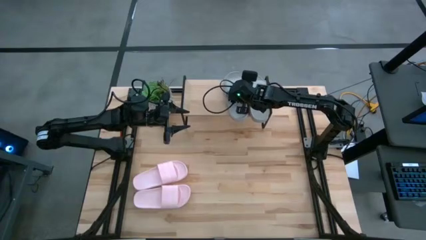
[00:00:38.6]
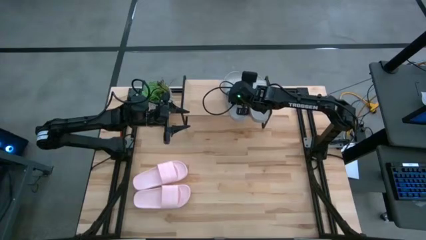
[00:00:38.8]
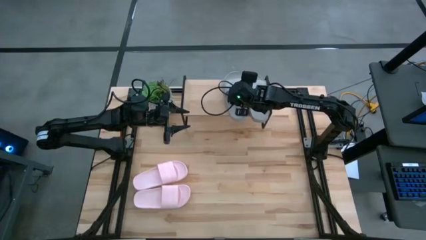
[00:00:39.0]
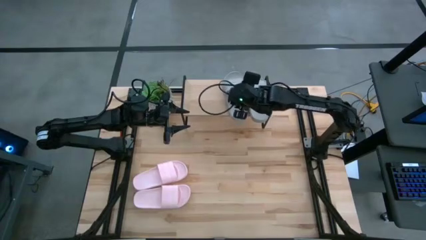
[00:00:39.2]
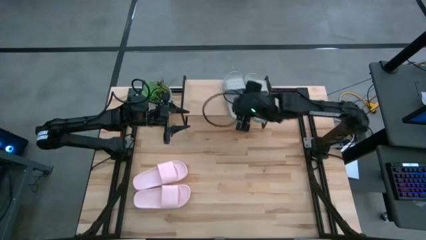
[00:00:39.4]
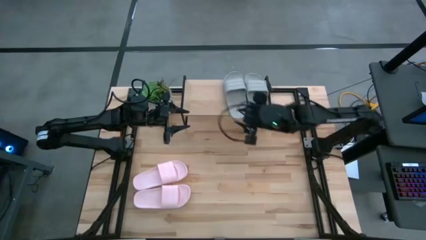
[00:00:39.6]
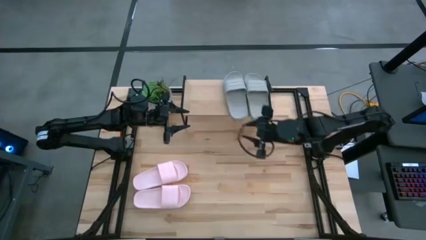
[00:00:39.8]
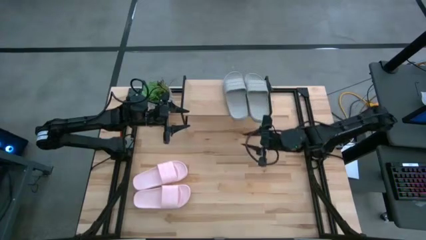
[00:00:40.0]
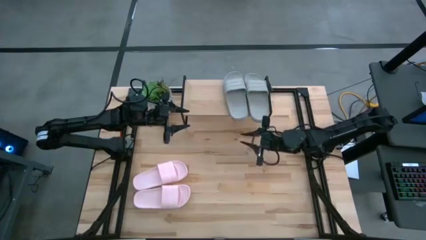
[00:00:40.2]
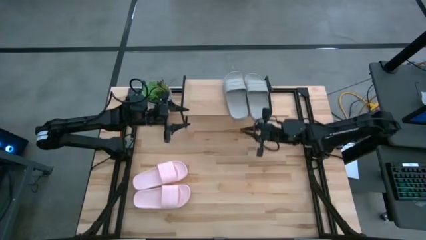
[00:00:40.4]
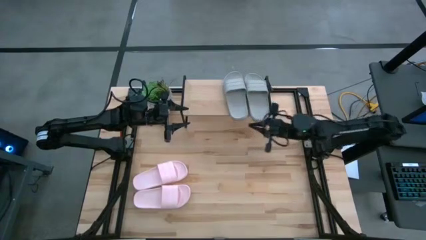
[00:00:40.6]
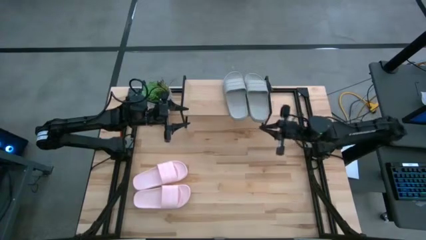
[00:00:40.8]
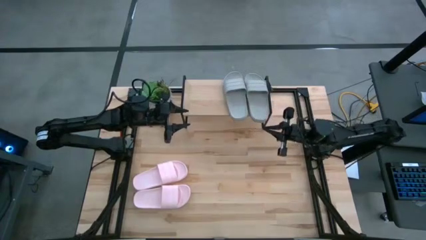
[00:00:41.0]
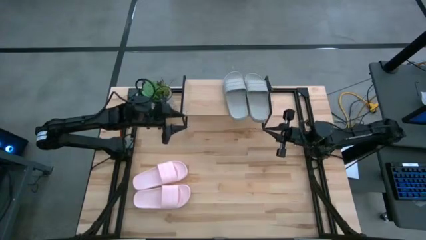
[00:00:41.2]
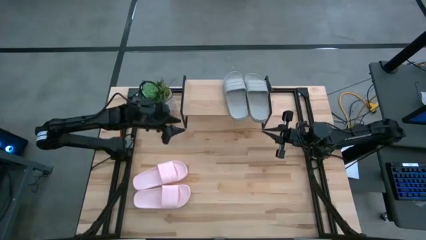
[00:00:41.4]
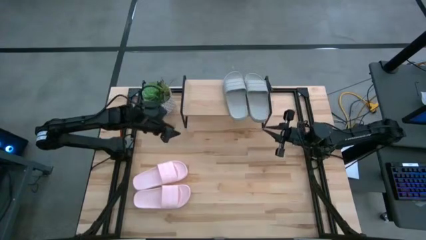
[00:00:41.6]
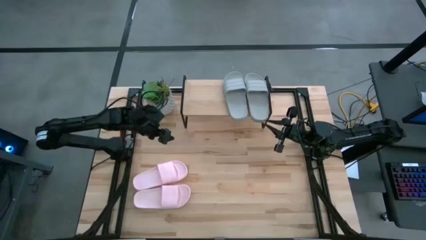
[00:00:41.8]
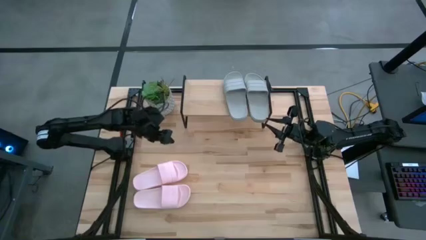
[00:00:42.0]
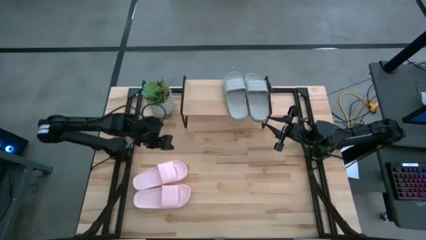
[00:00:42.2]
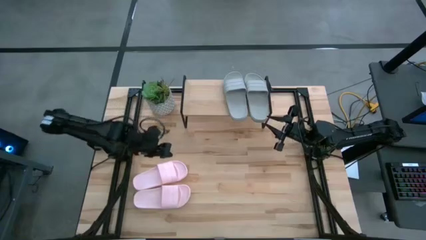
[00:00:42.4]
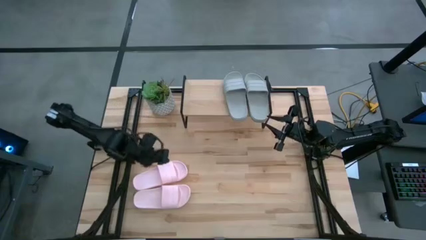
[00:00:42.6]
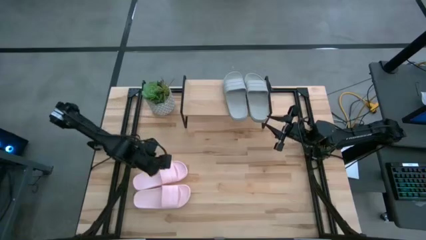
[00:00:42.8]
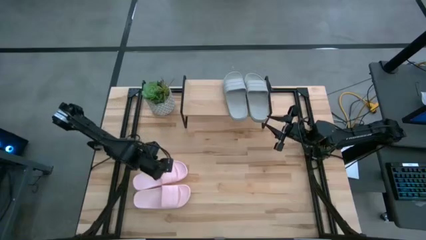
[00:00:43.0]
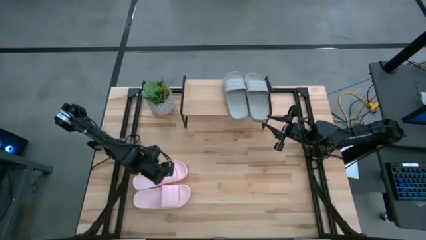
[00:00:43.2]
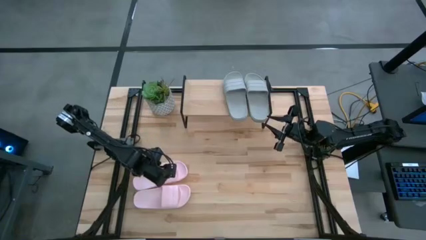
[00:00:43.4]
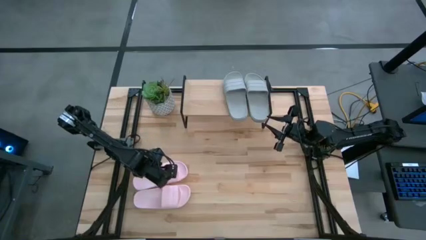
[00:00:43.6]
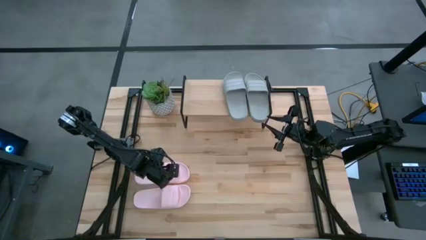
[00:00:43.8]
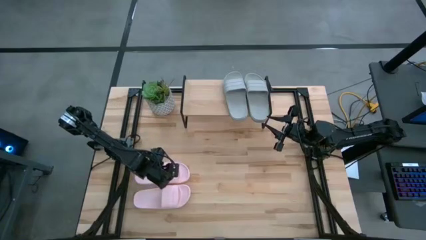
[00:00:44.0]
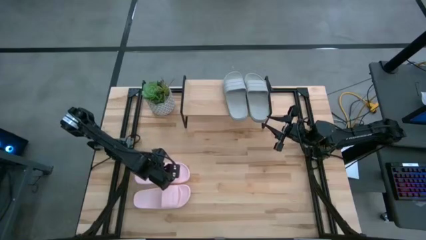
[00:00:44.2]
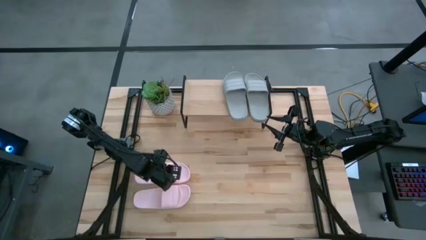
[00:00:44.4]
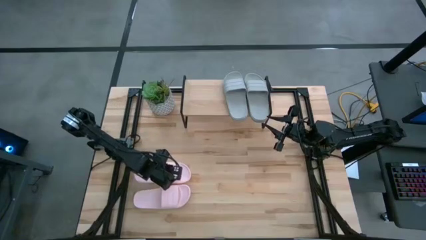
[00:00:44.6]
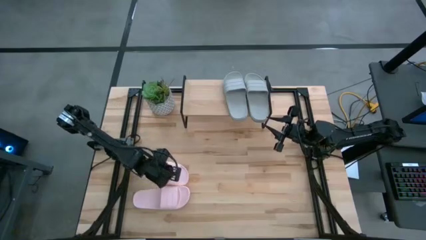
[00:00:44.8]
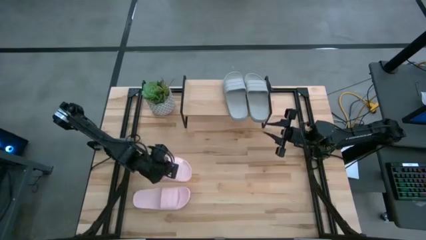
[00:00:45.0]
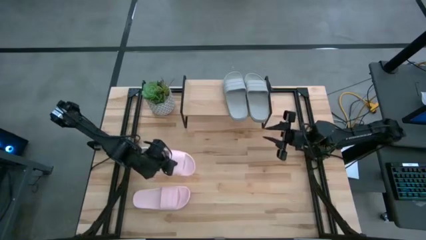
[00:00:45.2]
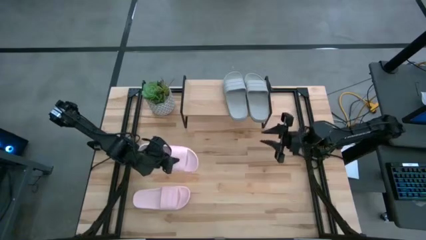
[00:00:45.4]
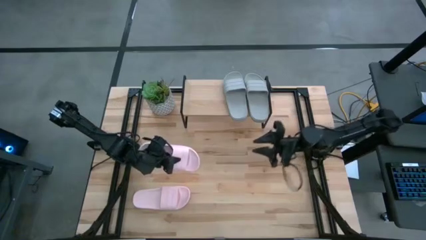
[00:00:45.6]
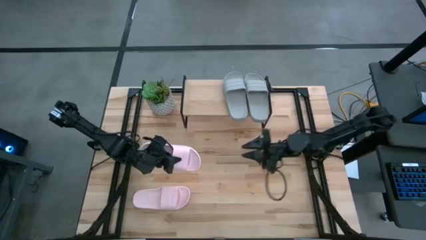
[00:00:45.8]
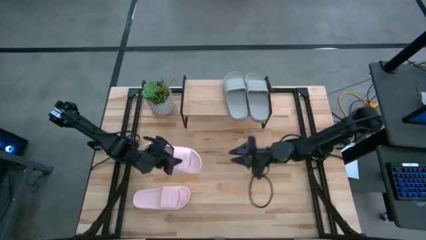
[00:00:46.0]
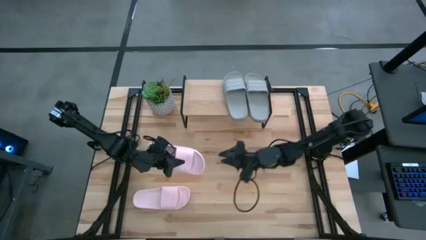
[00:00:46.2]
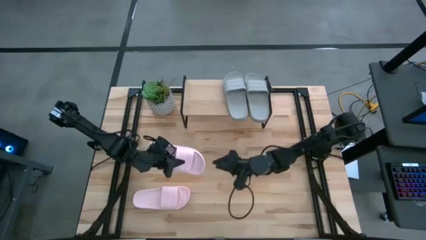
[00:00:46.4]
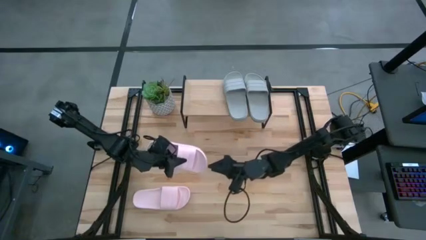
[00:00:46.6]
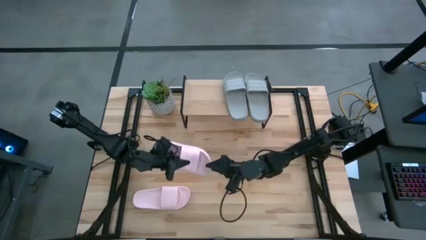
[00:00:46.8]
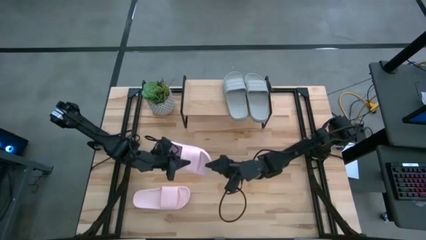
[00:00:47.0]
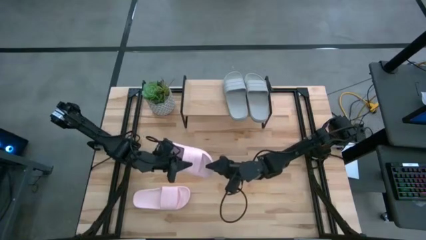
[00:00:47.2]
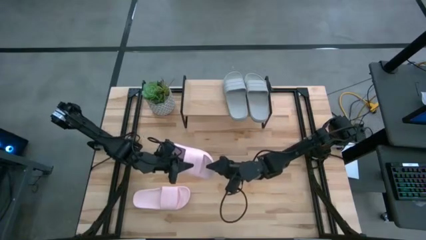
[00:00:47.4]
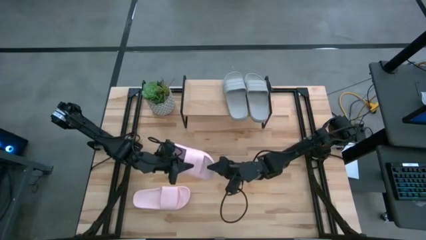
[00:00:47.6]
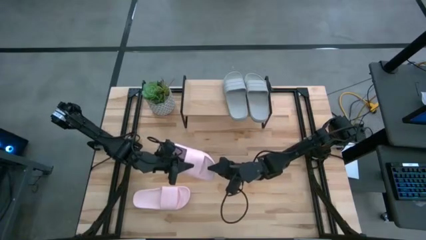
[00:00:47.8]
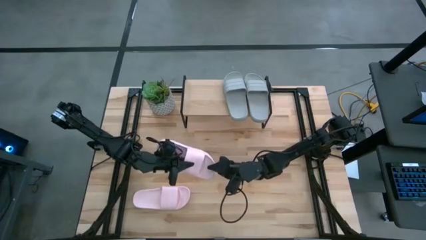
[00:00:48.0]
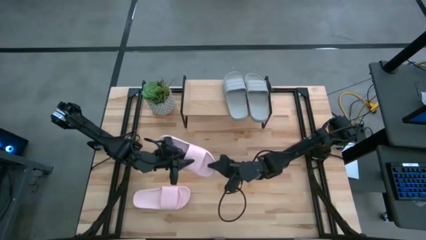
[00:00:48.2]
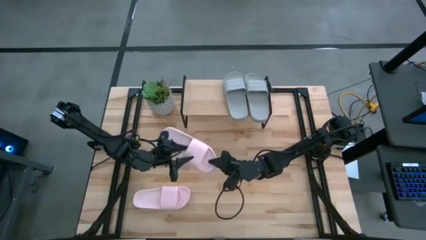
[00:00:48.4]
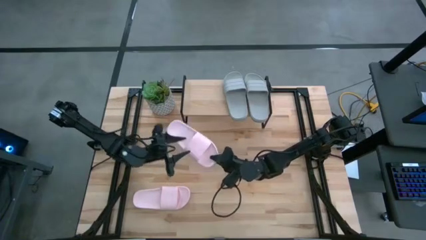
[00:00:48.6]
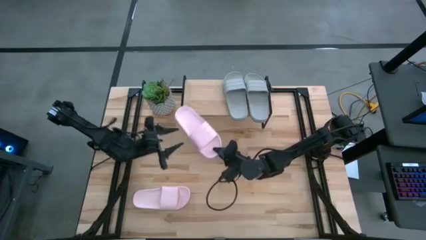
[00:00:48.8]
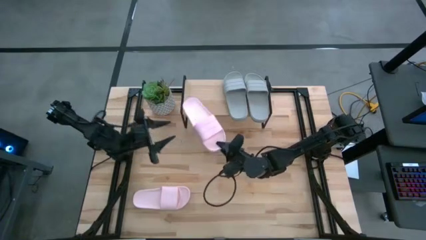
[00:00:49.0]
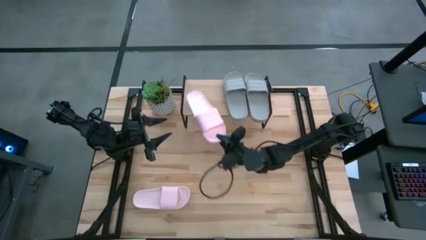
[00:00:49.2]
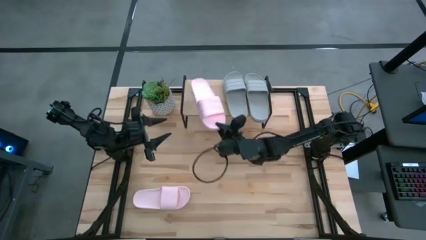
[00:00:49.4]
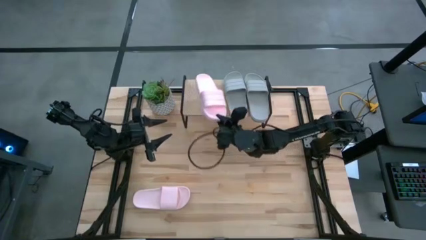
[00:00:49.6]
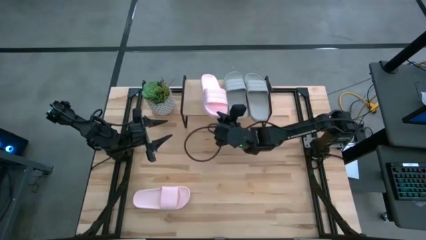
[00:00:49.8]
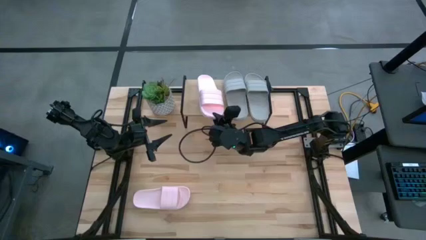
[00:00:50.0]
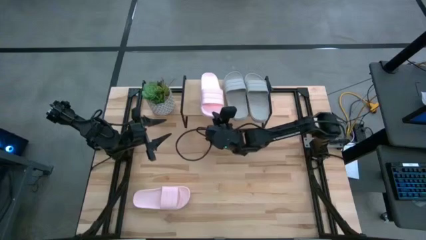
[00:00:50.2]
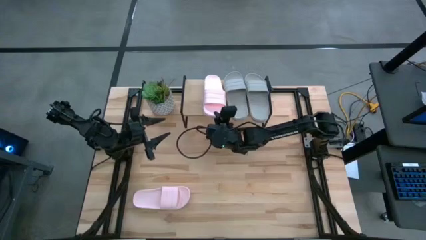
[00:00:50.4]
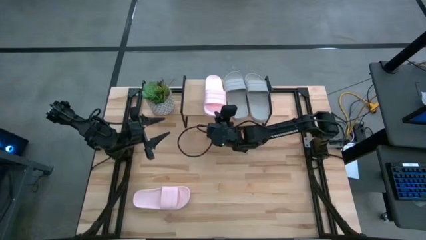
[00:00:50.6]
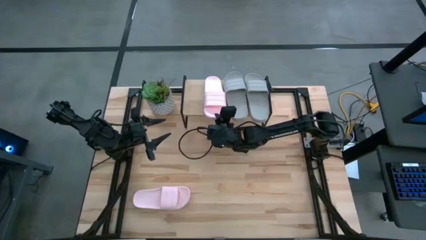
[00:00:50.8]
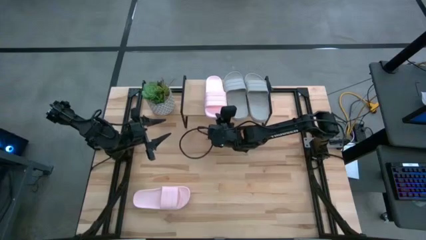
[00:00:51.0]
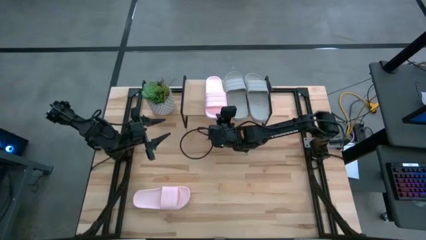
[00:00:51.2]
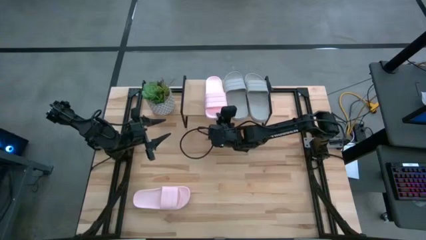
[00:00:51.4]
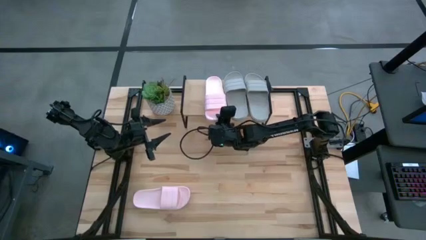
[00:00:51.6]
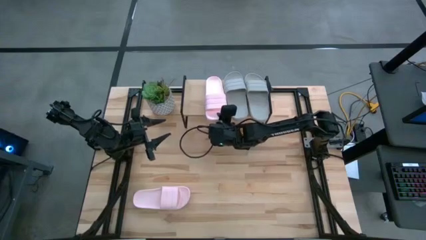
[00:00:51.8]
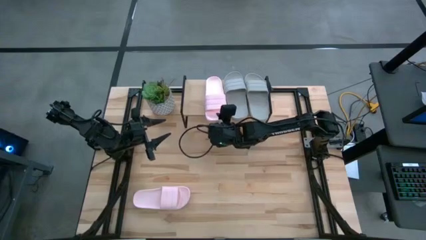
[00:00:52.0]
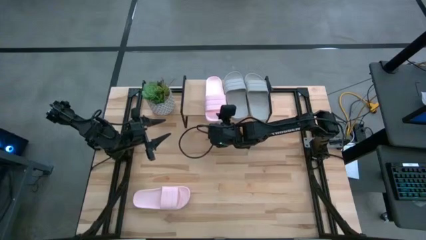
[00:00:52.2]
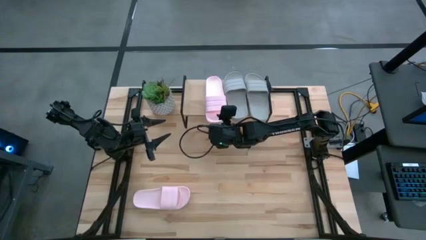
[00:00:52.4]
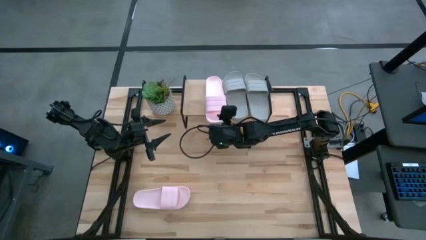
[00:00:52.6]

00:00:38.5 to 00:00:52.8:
Task: Pick and place slides into the shelf
Put the top pink slides on the shelf

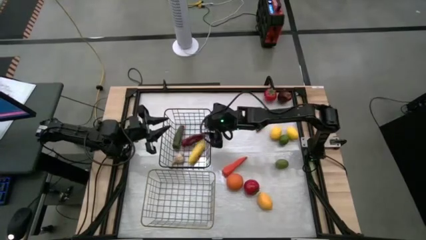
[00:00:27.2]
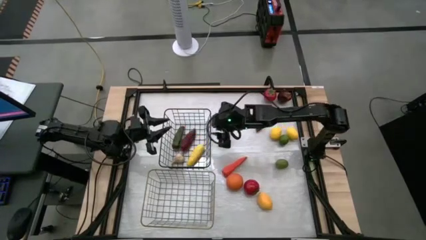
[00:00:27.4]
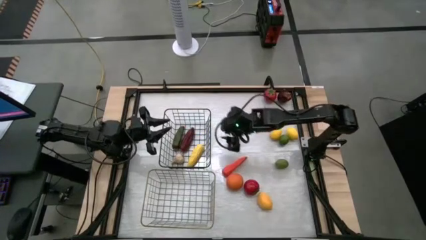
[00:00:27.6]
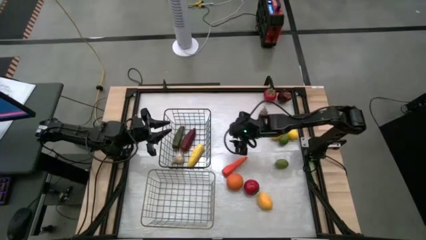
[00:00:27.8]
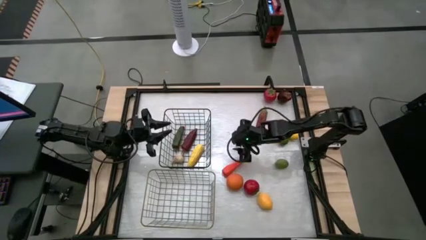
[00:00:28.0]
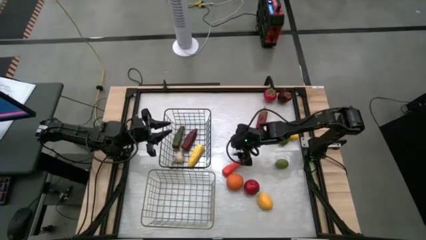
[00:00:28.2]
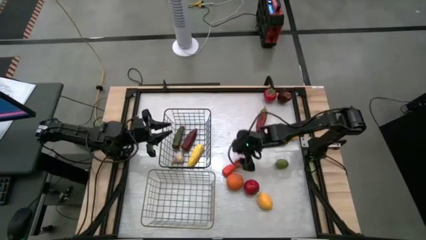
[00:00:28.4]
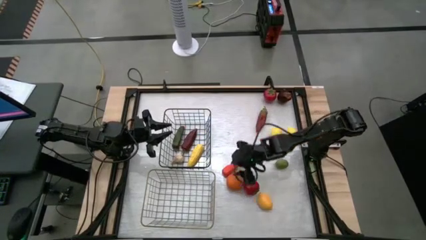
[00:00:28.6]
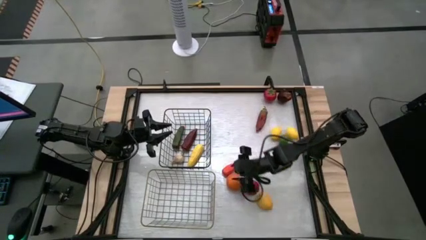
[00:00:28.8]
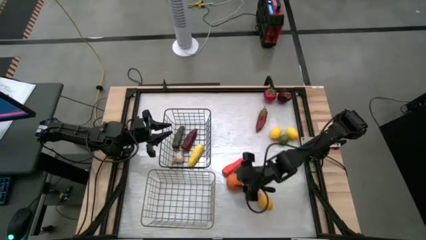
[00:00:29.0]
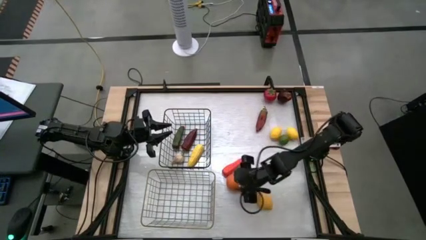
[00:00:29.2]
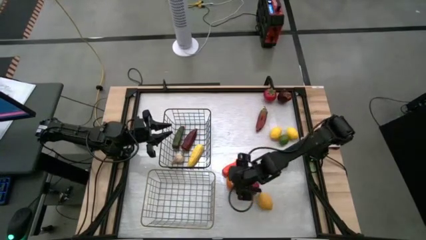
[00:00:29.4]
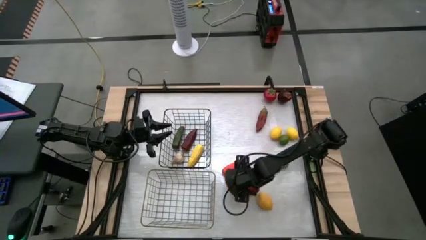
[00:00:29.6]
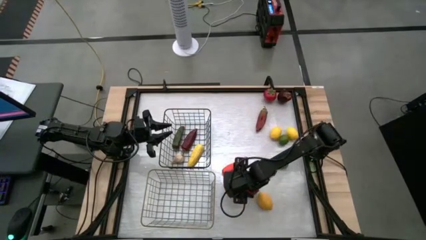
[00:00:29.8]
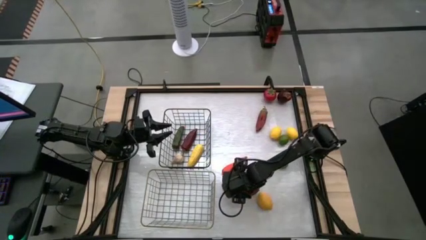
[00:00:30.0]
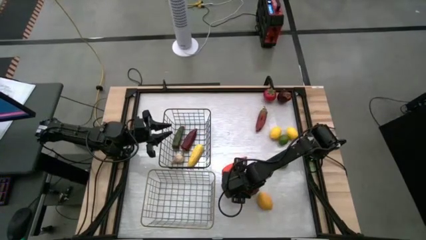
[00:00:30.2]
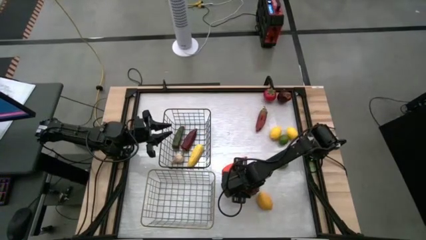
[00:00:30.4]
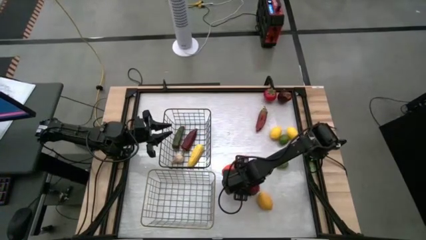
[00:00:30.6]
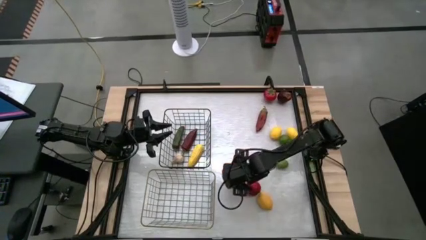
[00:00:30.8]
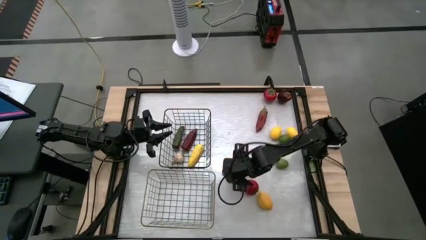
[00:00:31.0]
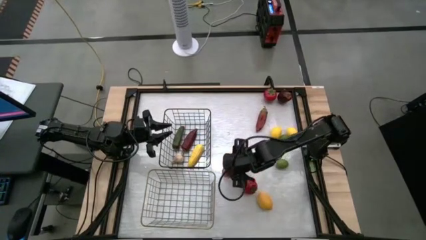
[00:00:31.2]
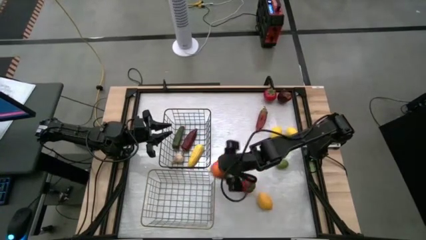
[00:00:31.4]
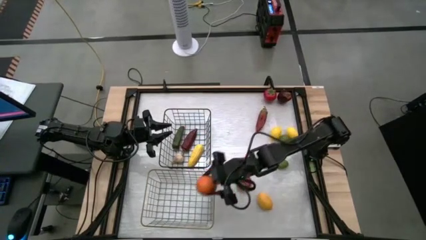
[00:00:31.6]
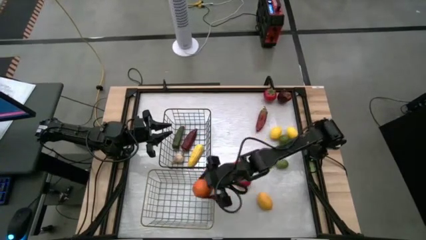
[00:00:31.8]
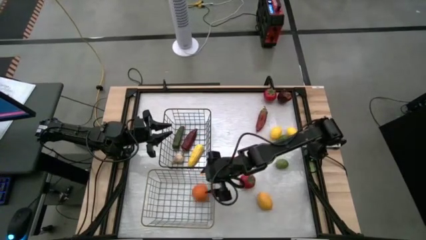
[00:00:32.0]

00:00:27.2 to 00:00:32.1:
Task: Sort produce into baskets
Put the orange into the silver wire basket
